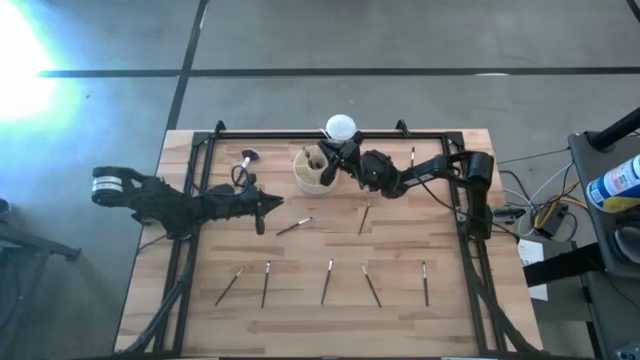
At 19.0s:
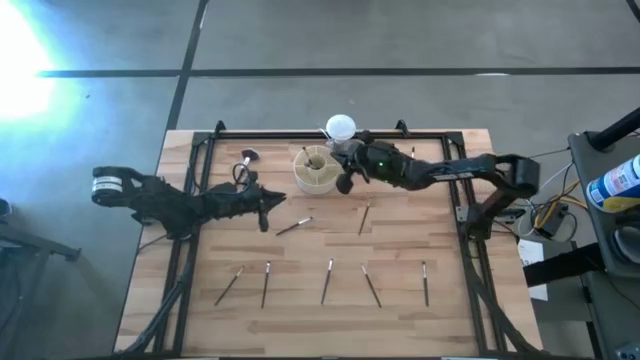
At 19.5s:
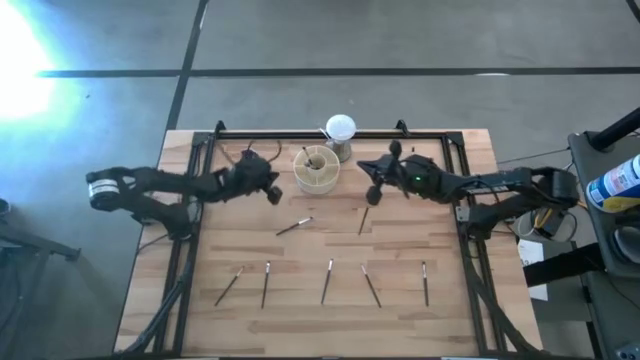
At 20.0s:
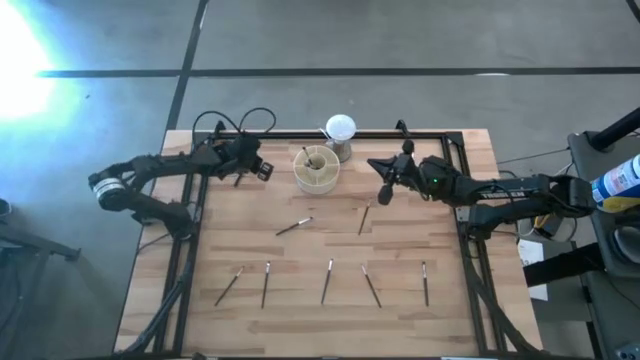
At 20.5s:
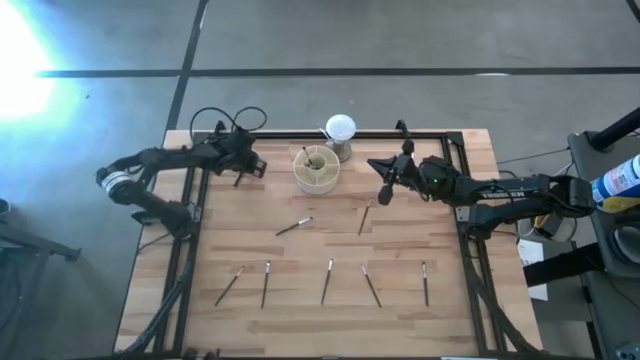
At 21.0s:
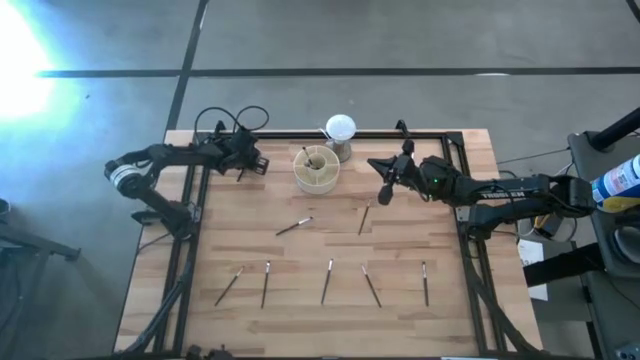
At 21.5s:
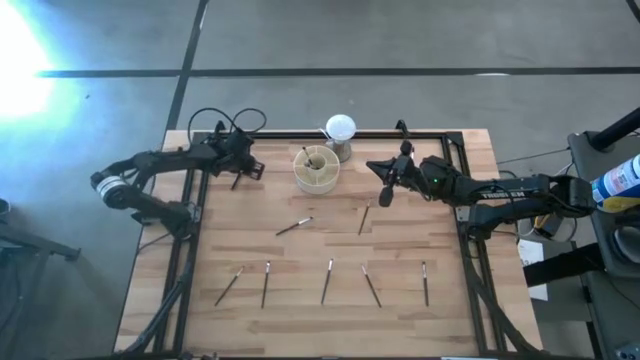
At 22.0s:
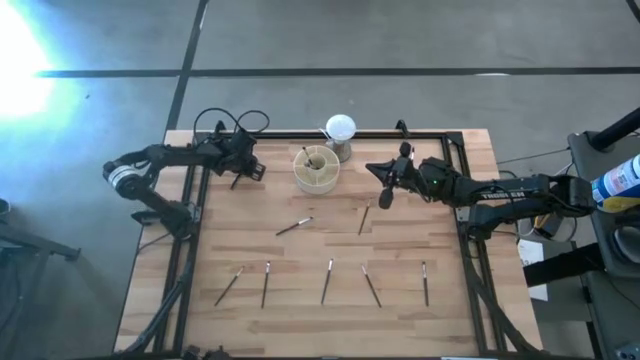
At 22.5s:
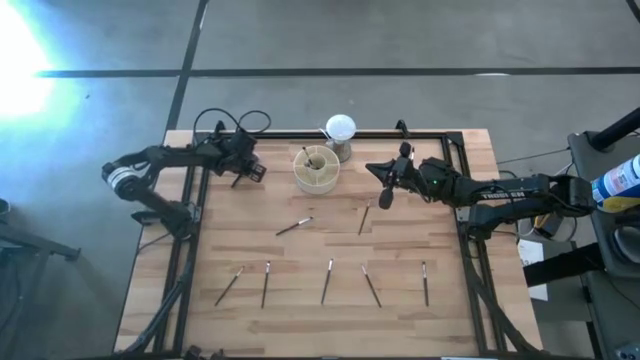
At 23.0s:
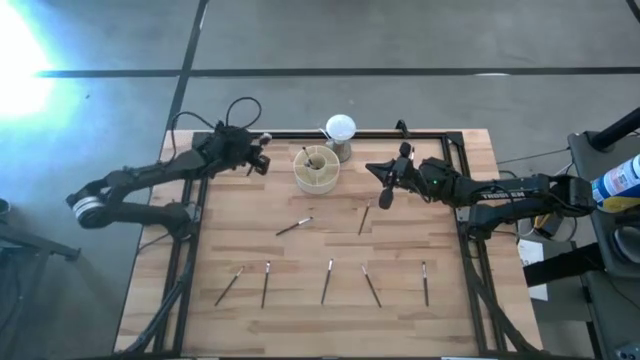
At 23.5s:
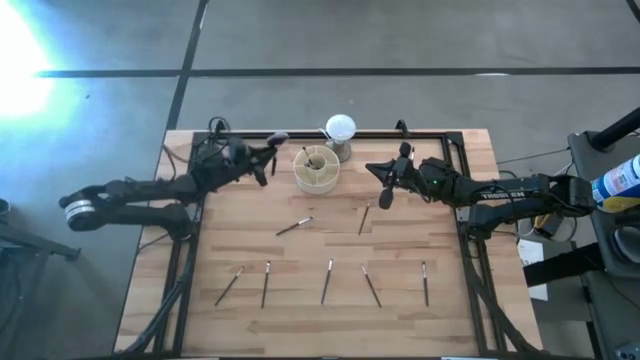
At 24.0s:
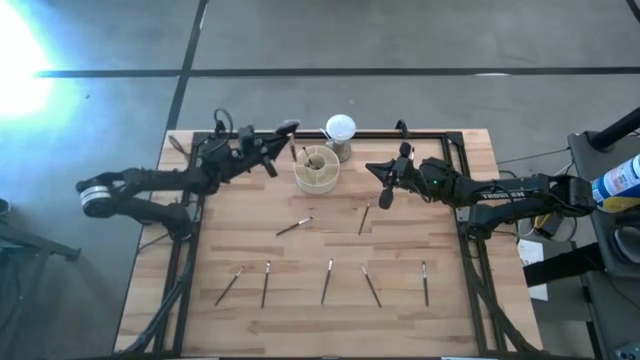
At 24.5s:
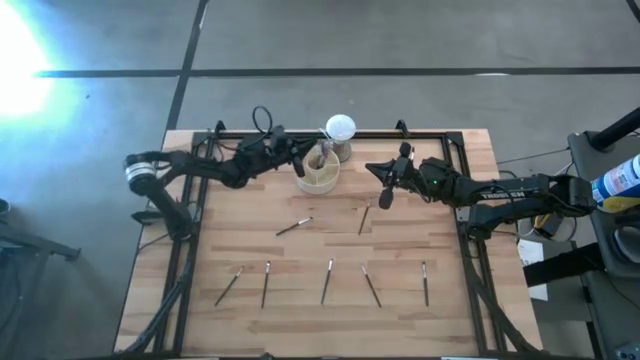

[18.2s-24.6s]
Task: Put items in baskets/containers
Put the black highlighter brush into the white organizer

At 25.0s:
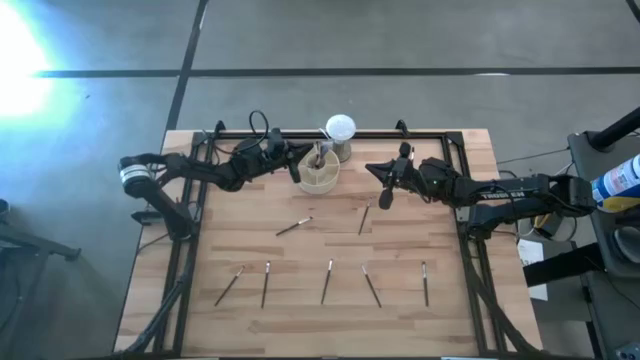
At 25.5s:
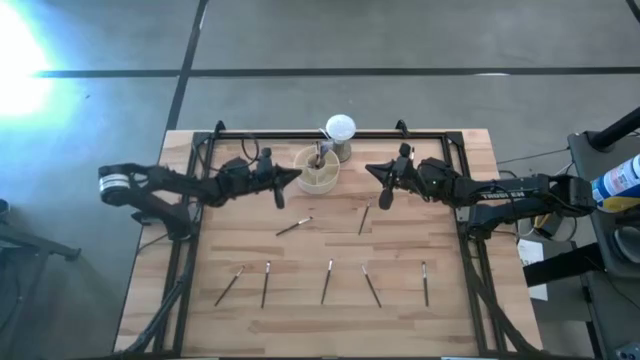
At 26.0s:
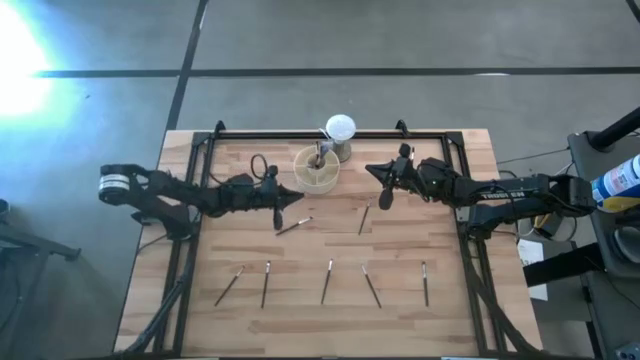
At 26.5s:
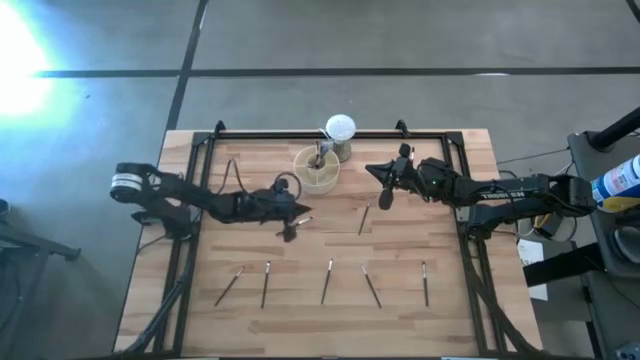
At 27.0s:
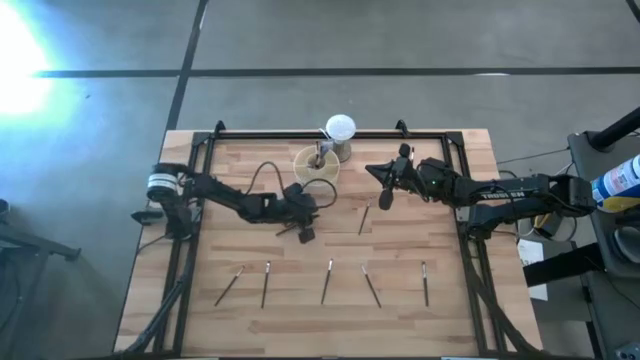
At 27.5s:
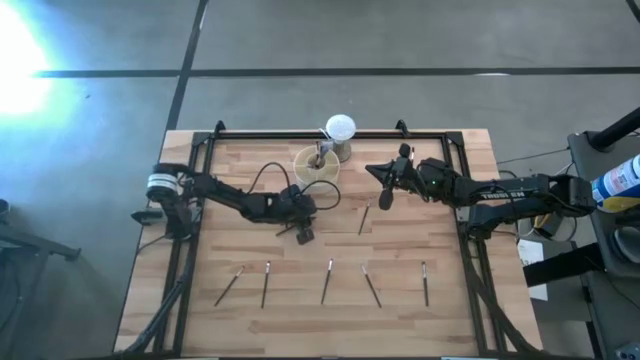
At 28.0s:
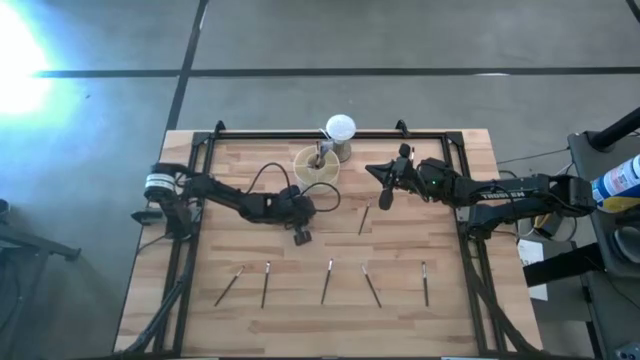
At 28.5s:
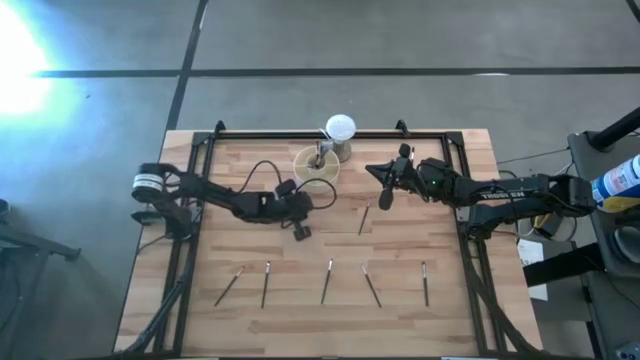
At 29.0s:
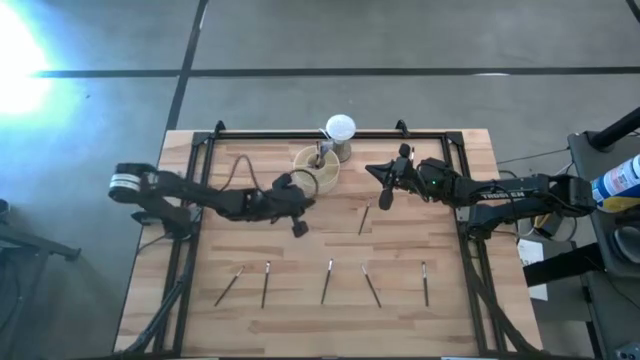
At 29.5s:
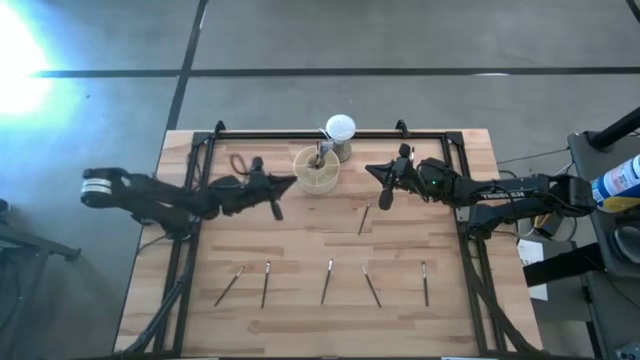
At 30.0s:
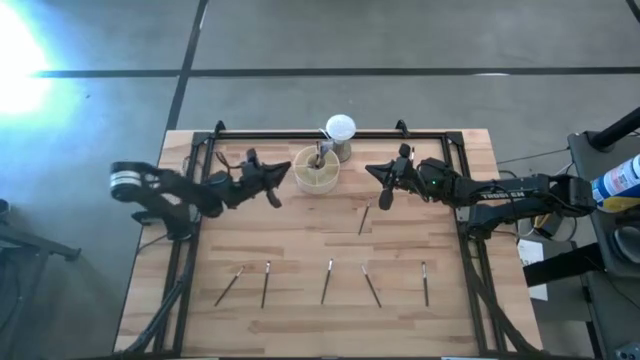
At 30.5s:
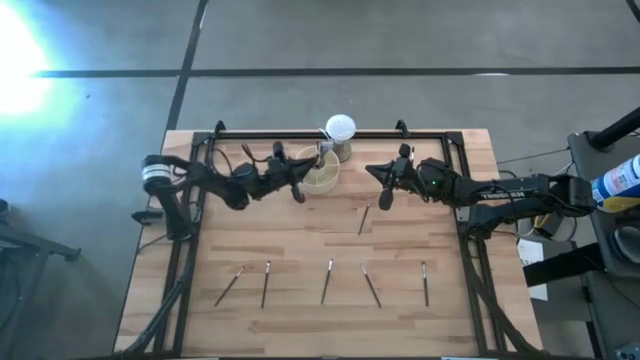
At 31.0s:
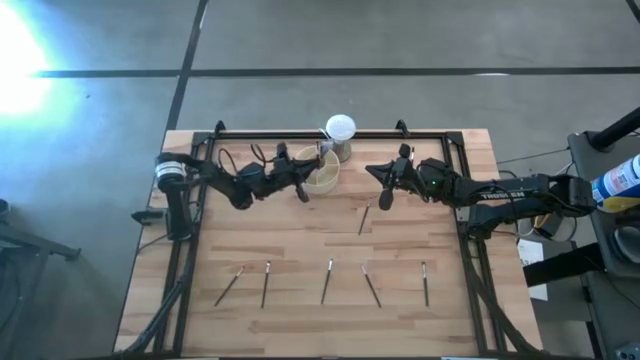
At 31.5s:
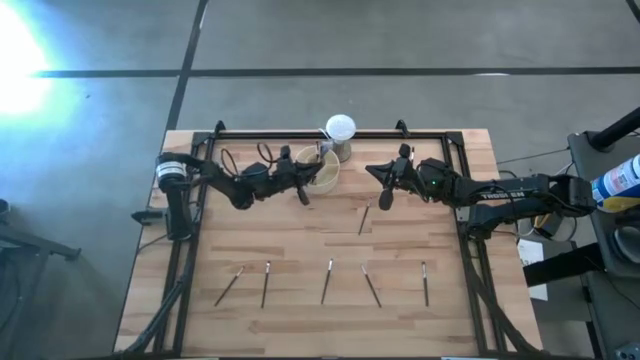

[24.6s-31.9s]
Put the black eyeshadow brush into the white organizer

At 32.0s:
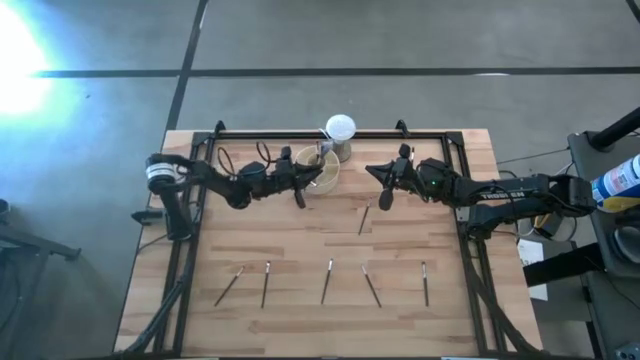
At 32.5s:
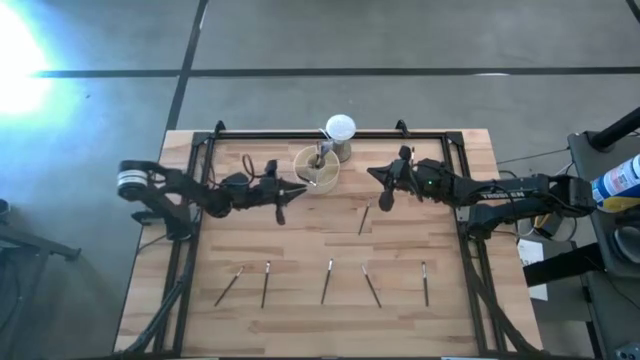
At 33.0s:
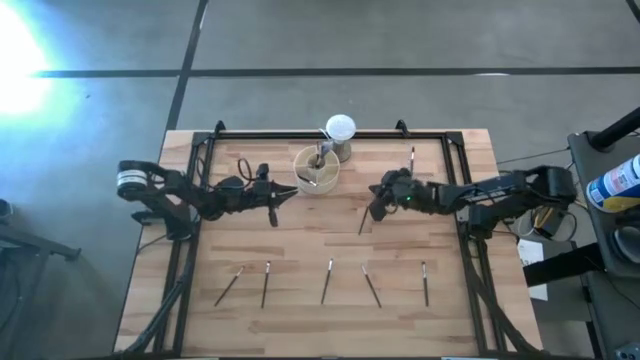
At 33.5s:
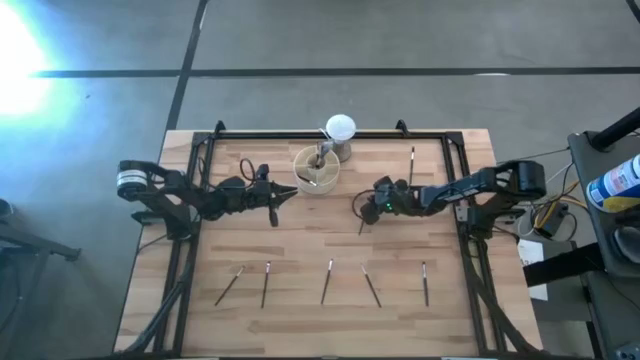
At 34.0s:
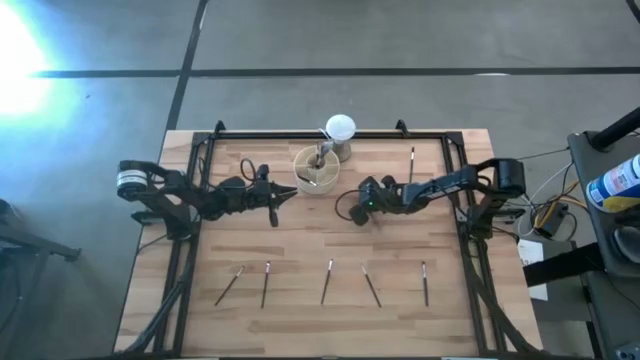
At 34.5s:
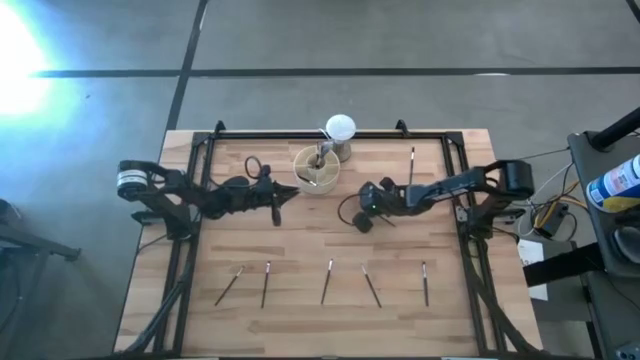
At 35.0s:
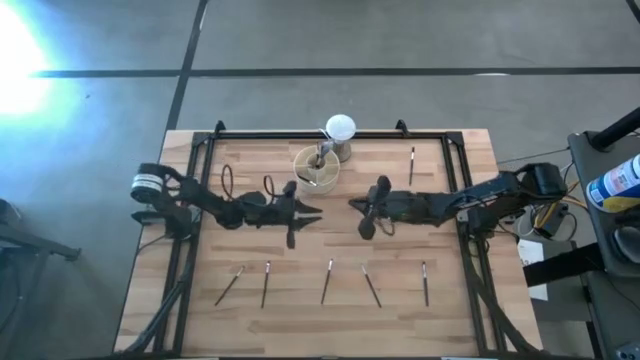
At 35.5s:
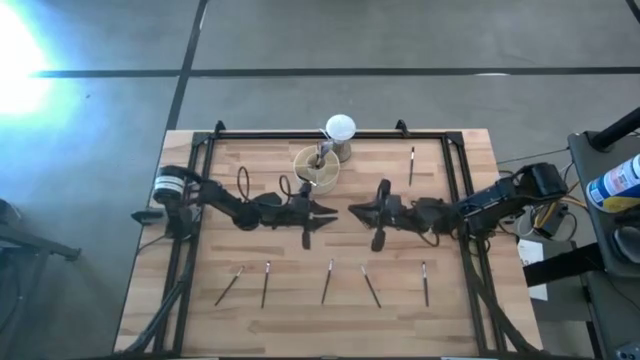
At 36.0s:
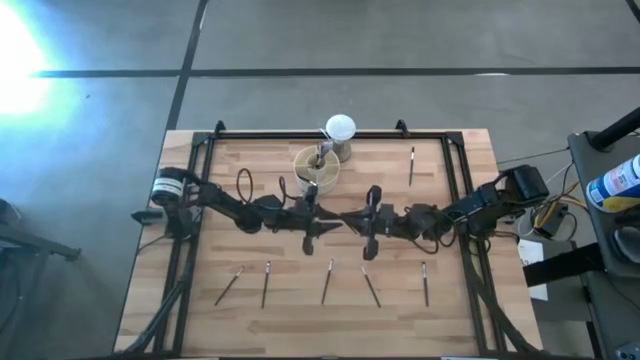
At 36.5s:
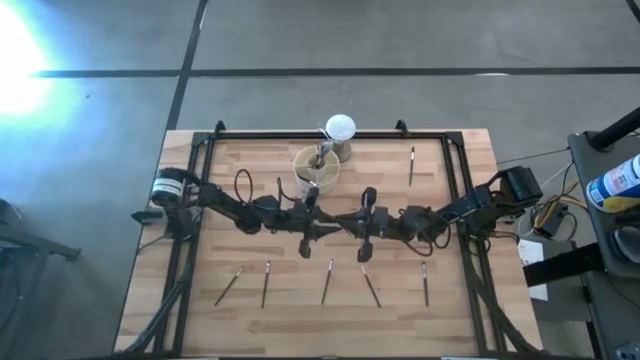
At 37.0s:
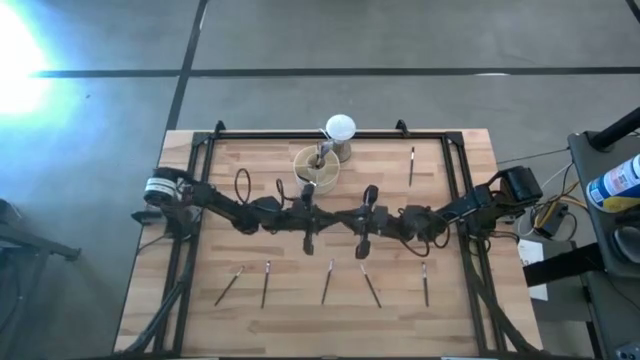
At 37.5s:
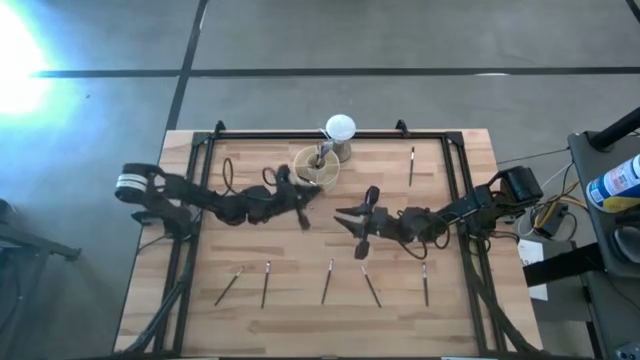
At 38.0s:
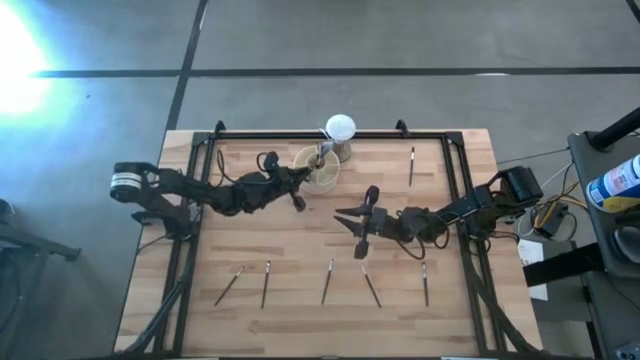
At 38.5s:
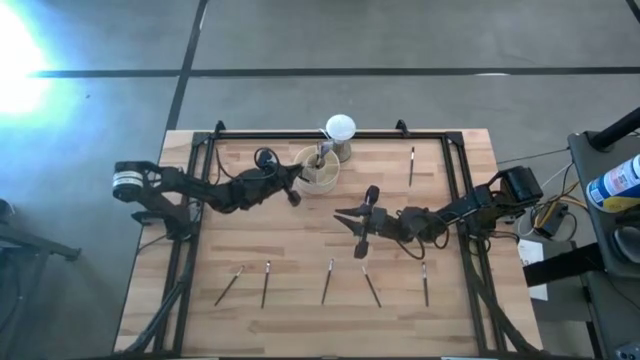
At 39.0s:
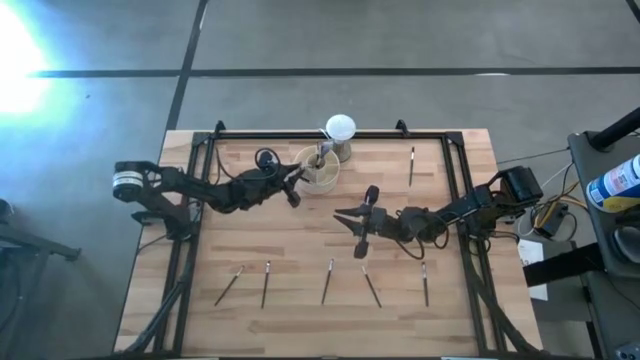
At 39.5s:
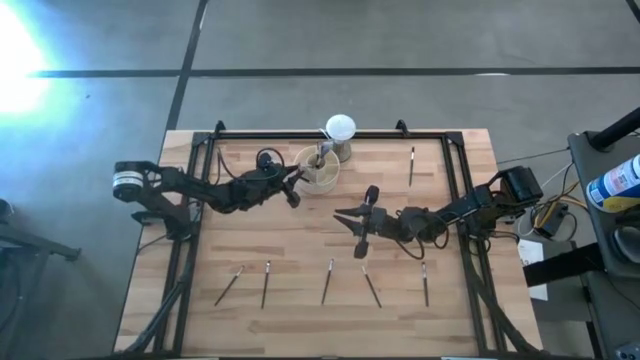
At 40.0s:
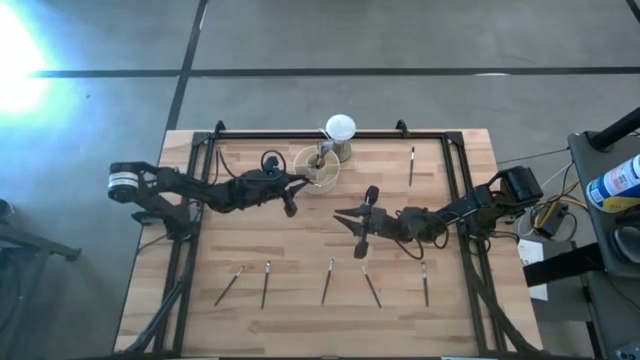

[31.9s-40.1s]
Put the black eyeshadow brush into the white organizer

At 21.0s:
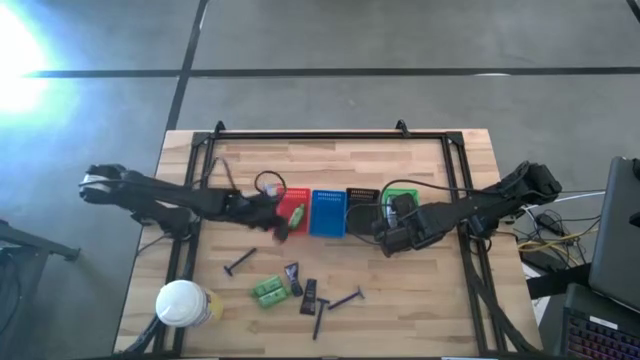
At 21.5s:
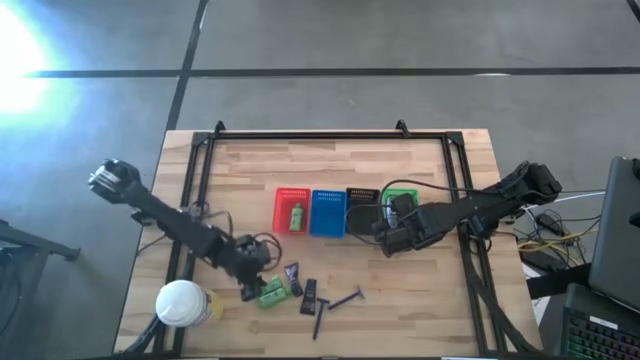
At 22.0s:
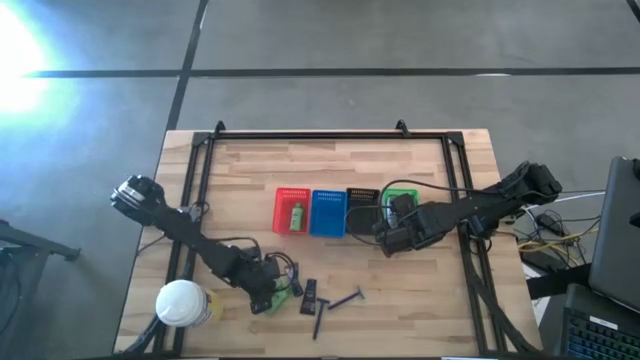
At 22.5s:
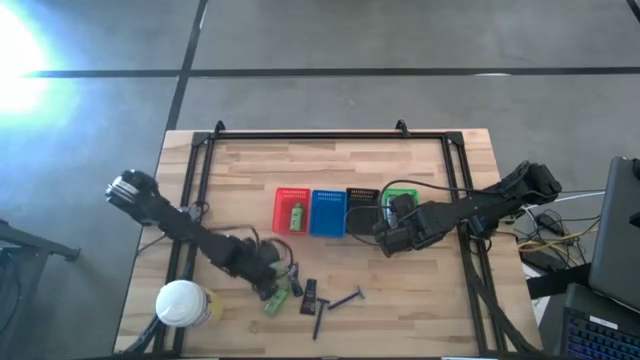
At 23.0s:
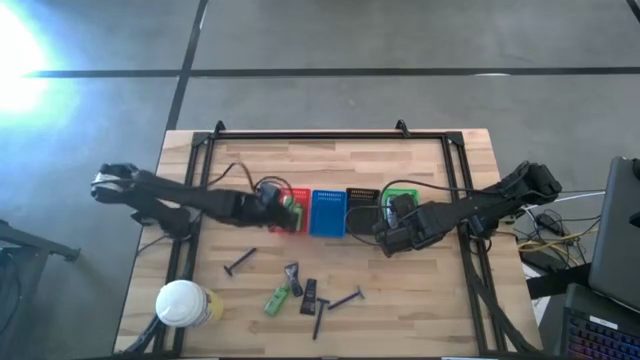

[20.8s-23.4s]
Task: Pick & Place Travel size toiletries
Put the green shampoo into the red bin
